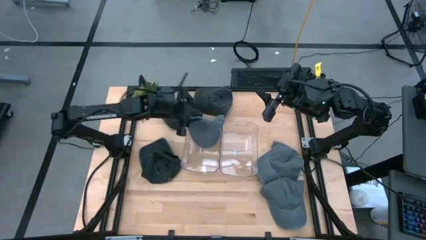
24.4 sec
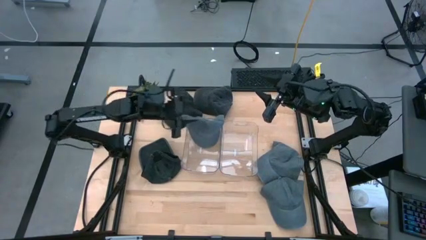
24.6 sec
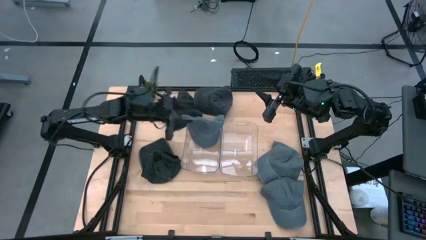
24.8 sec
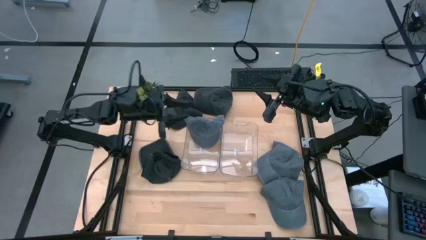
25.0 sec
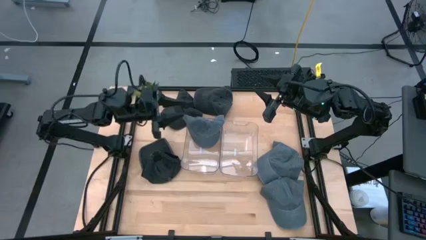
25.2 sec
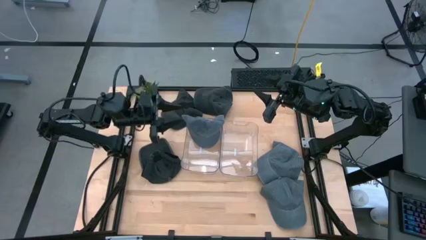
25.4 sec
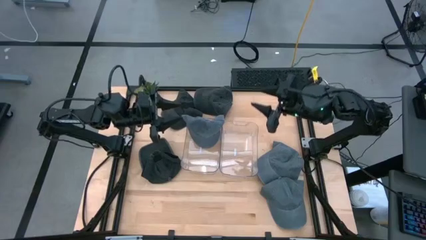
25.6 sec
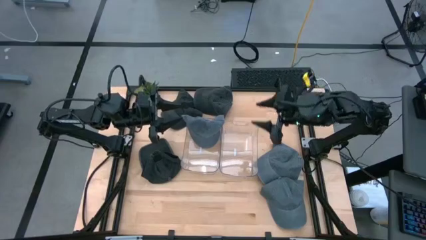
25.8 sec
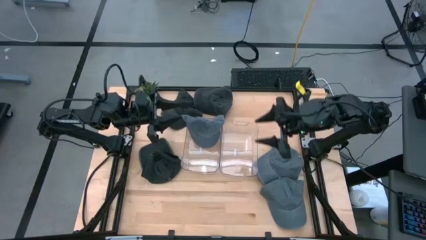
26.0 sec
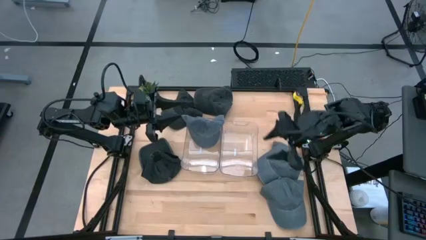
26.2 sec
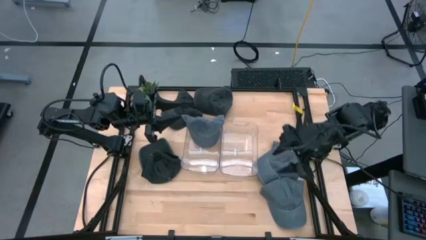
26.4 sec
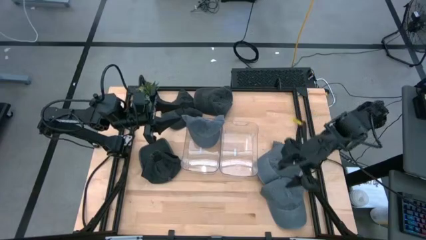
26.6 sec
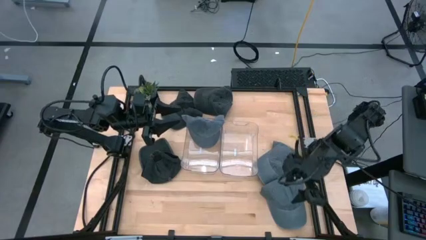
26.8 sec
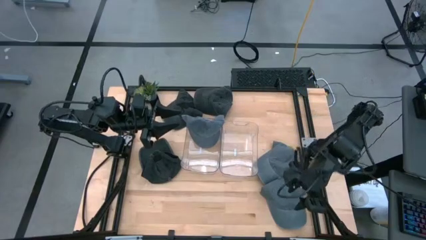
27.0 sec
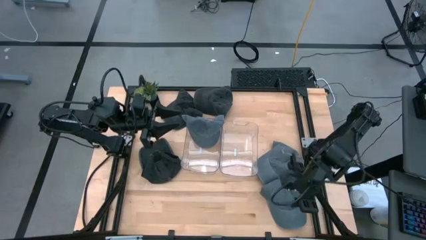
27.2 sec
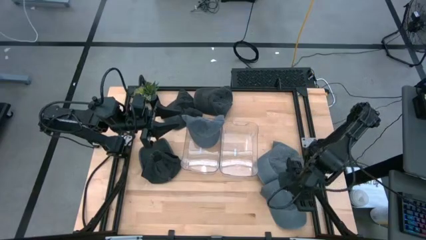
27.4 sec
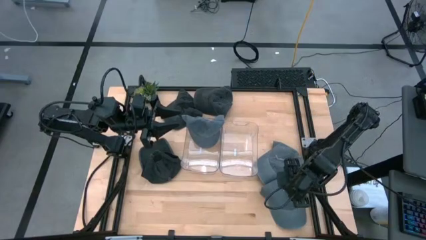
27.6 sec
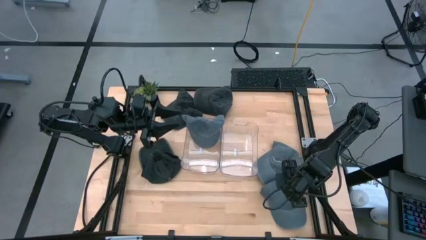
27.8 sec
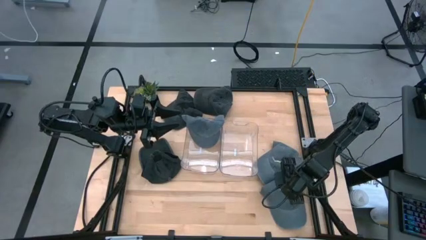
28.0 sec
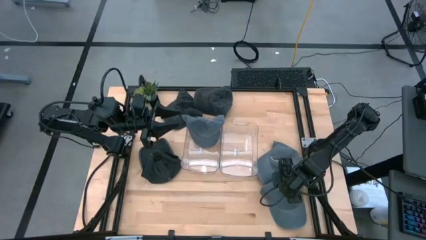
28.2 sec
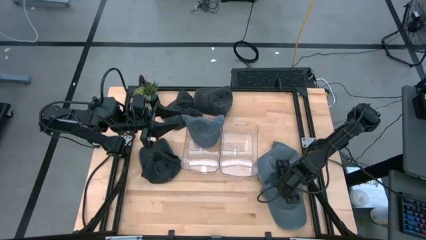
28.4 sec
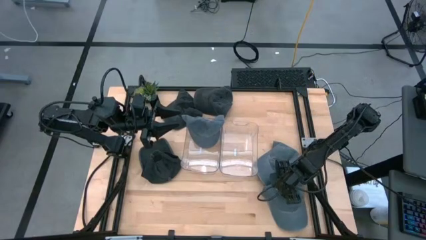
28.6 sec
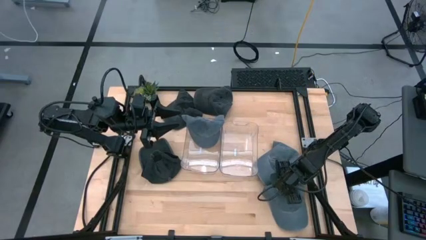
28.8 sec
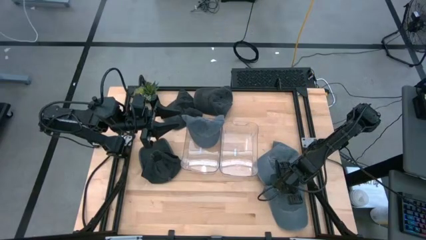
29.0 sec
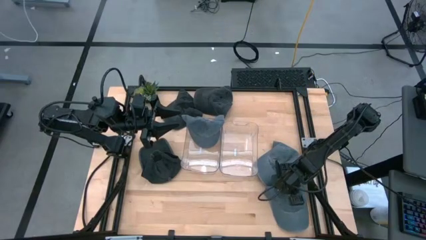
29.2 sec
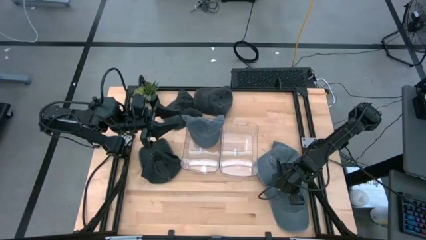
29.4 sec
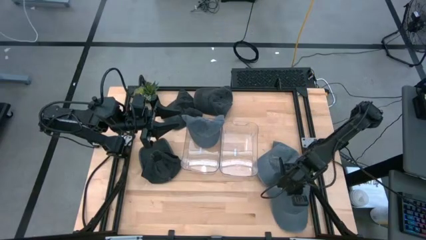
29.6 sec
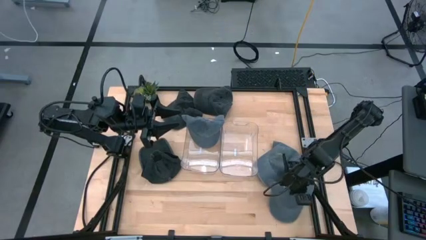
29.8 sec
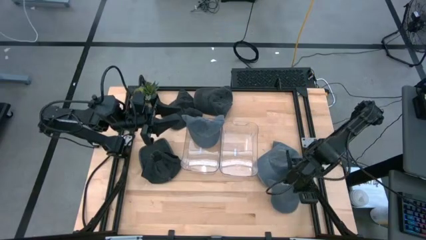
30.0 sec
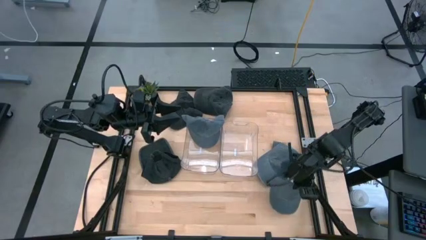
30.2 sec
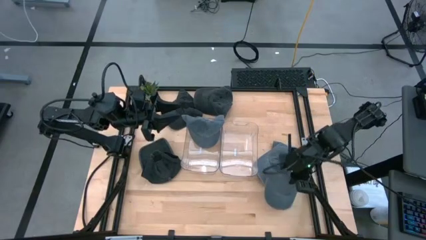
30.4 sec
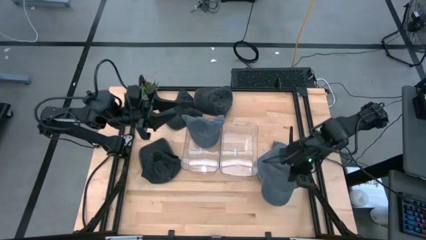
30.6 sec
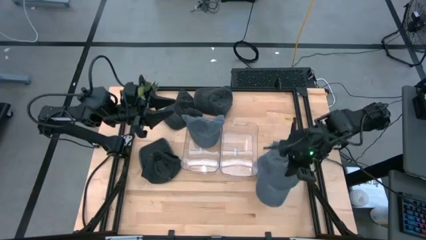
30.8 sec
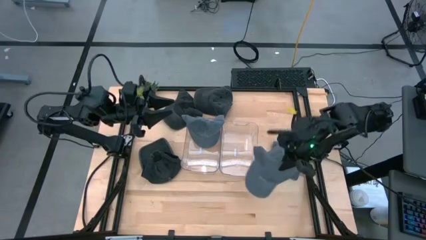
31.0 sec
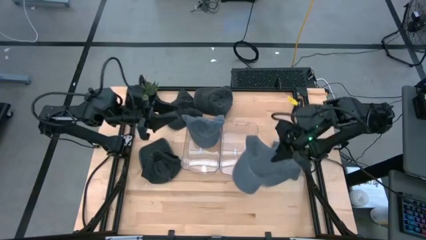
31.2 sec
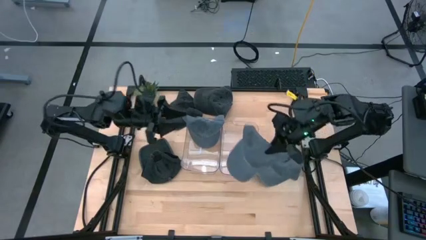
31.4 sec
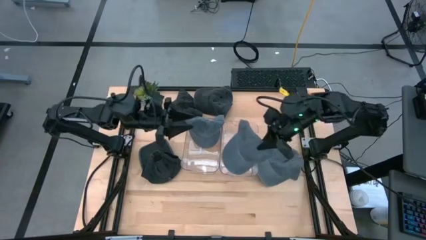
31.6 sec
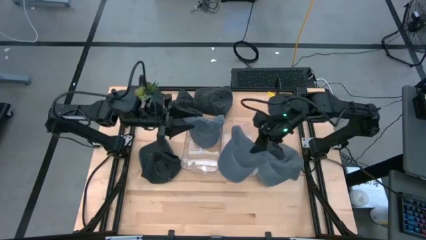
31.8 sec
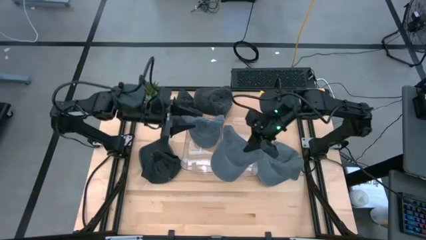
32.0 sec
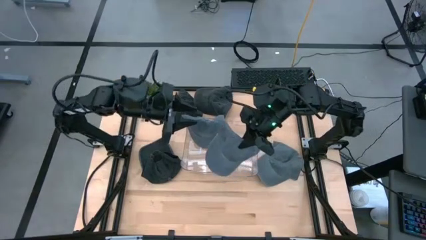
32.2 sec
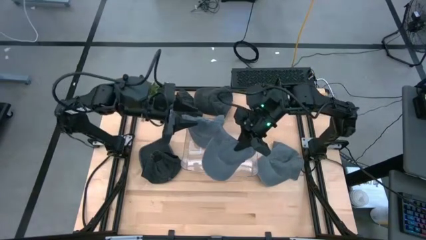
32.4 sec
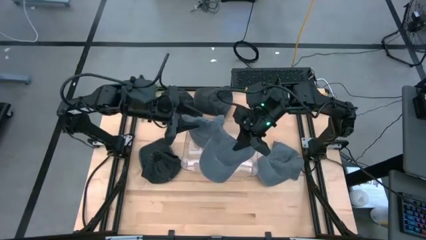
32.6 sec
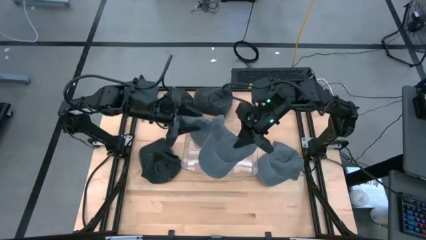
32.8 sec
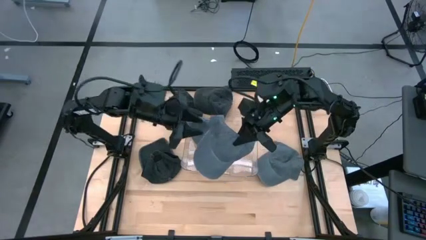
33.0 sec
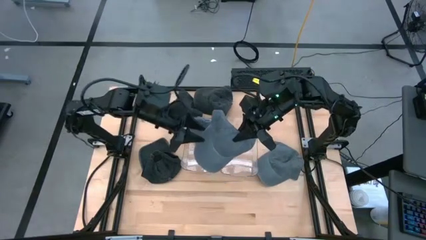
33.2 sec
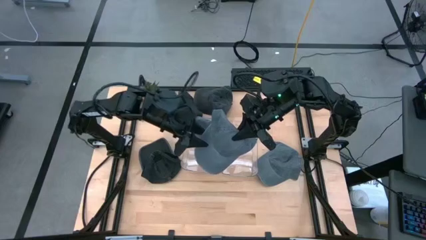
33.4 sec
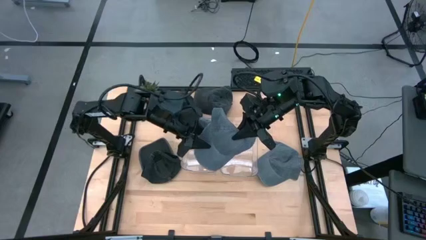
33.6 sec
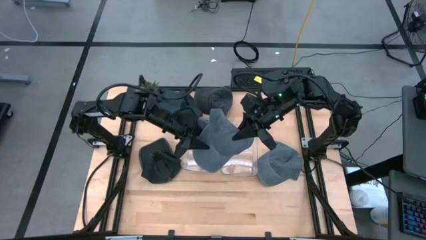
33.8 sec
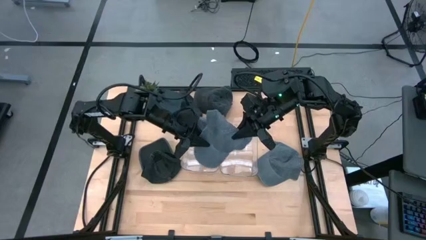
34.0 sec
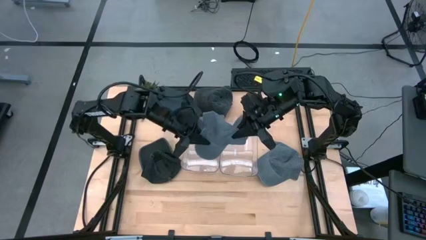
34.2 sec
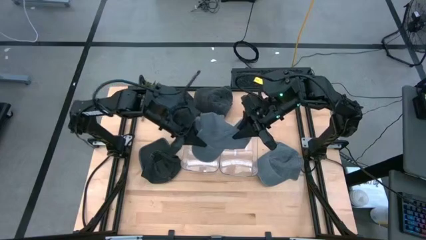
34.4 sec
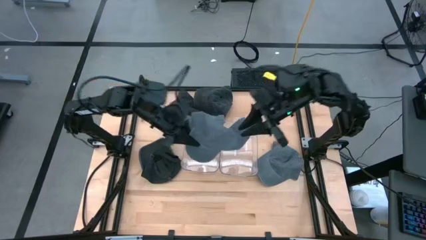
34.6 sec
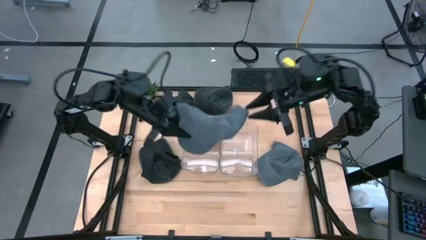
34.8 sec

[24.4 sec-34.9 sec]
Task: Pick & Place hat
Put the bottom gray cap into the left transparent bin
